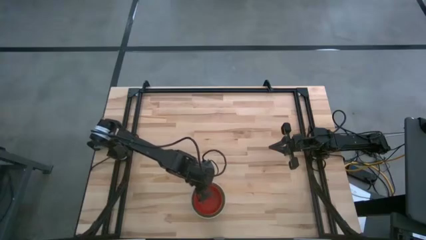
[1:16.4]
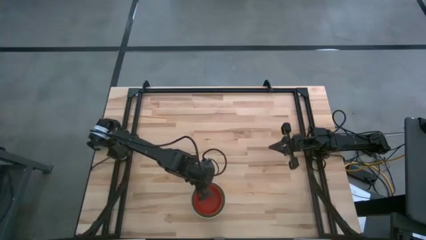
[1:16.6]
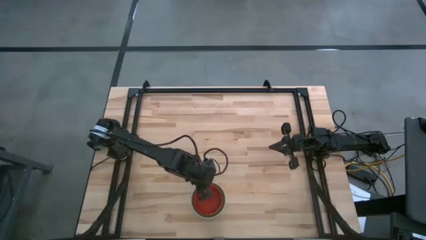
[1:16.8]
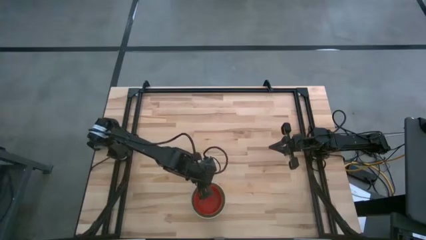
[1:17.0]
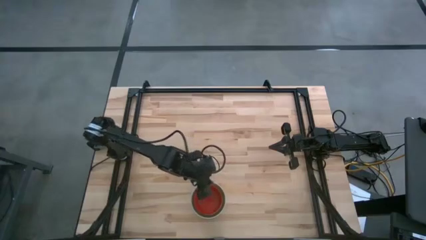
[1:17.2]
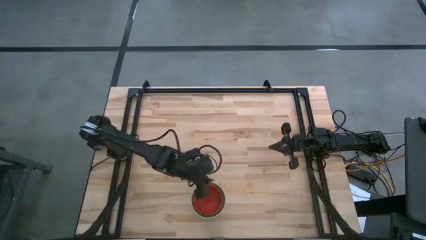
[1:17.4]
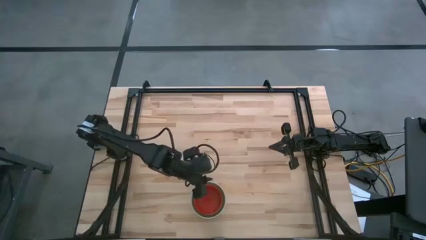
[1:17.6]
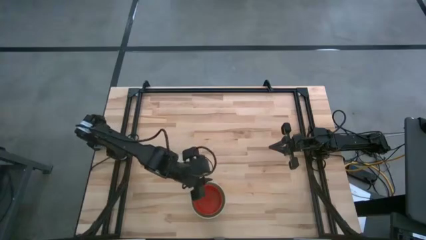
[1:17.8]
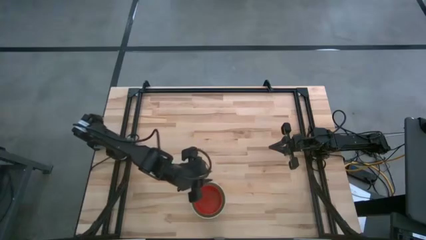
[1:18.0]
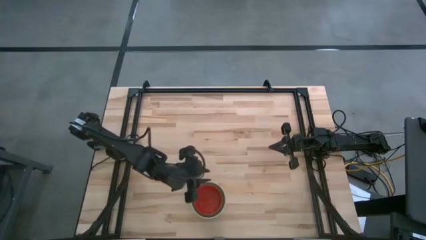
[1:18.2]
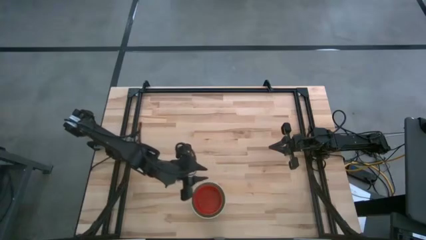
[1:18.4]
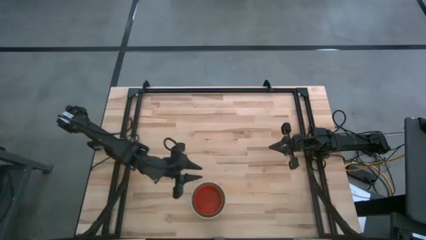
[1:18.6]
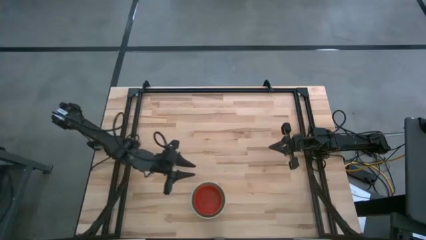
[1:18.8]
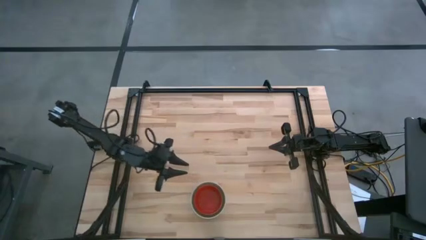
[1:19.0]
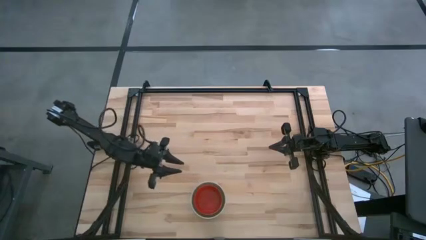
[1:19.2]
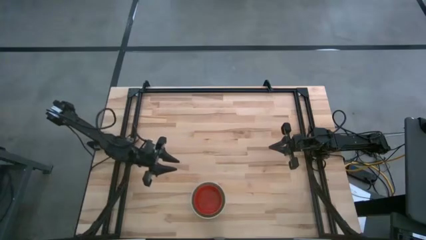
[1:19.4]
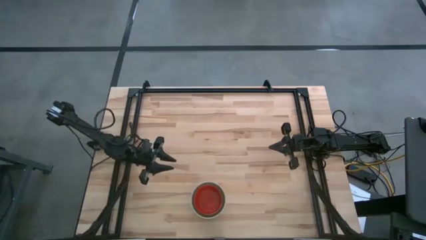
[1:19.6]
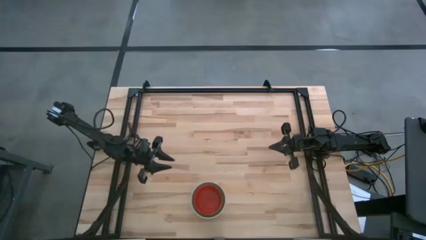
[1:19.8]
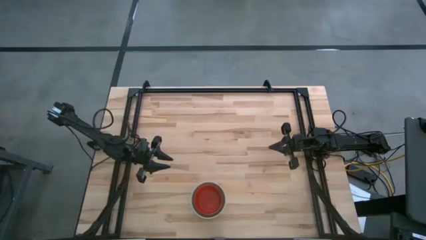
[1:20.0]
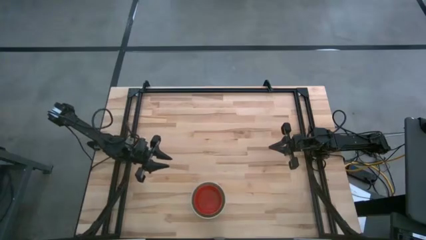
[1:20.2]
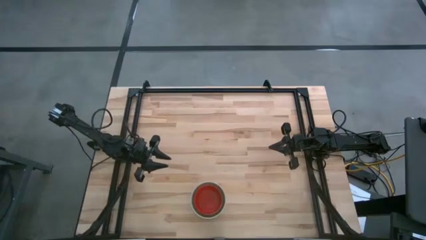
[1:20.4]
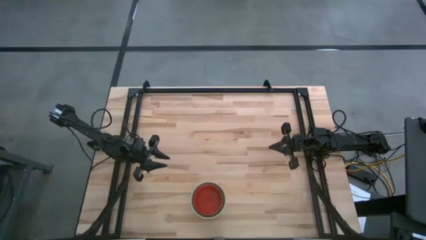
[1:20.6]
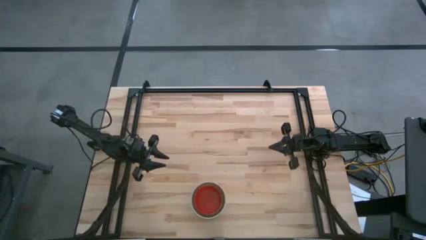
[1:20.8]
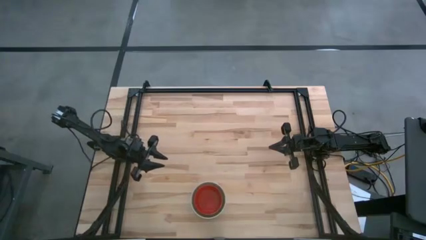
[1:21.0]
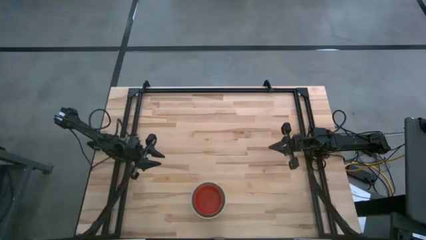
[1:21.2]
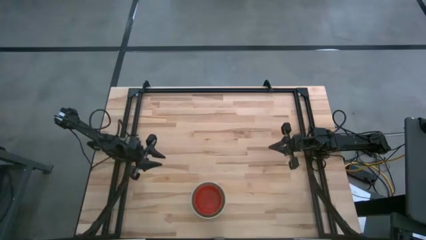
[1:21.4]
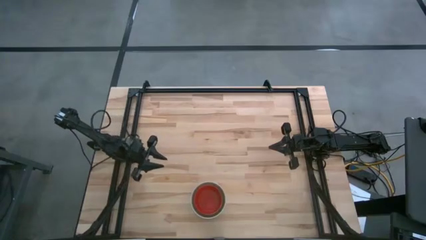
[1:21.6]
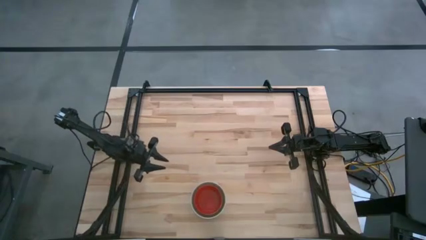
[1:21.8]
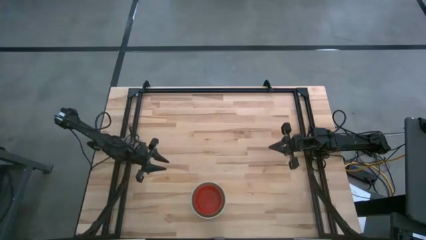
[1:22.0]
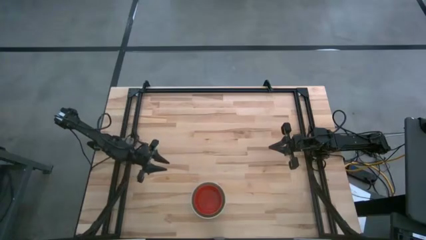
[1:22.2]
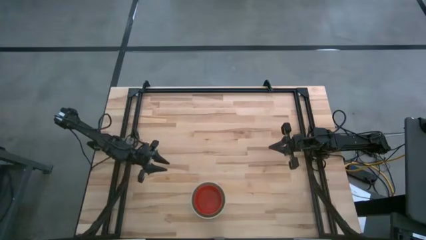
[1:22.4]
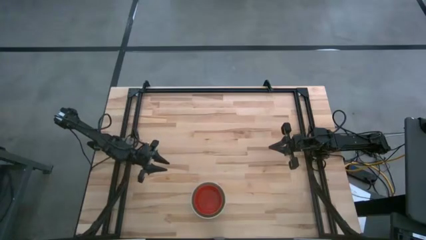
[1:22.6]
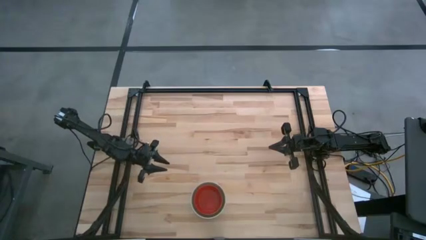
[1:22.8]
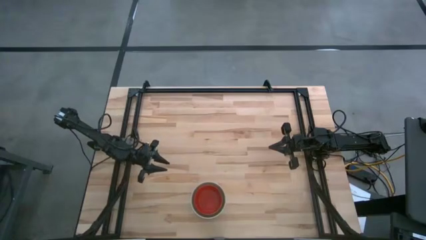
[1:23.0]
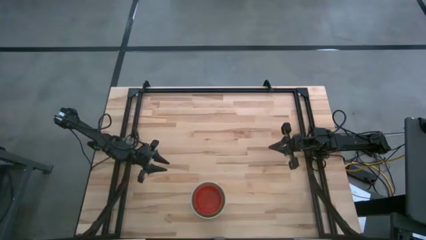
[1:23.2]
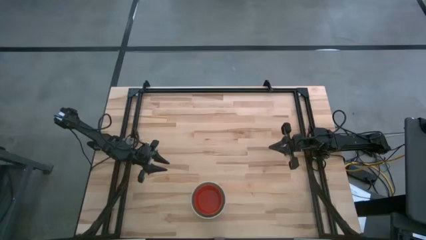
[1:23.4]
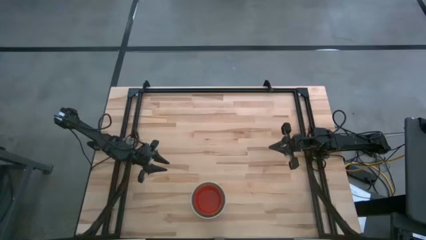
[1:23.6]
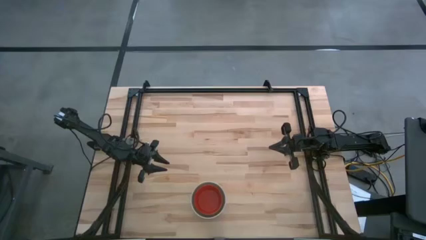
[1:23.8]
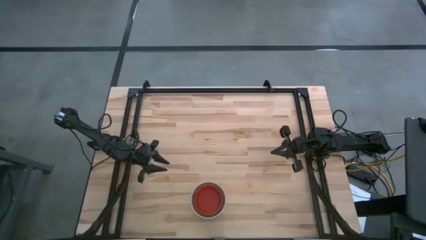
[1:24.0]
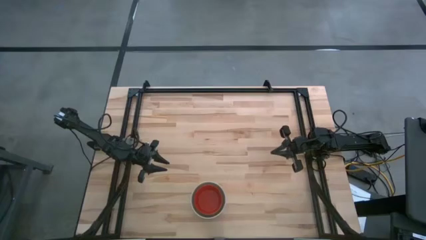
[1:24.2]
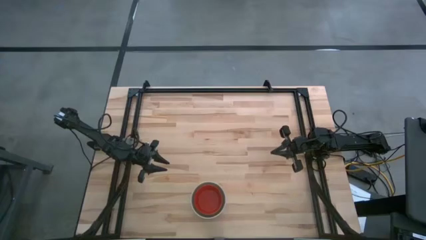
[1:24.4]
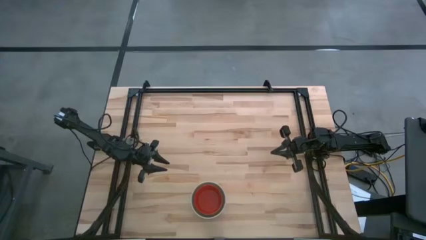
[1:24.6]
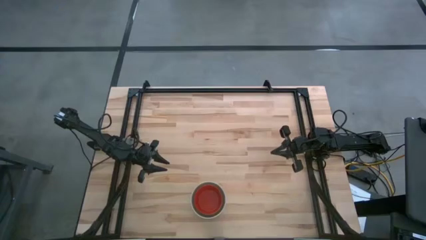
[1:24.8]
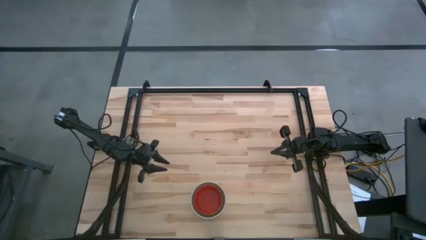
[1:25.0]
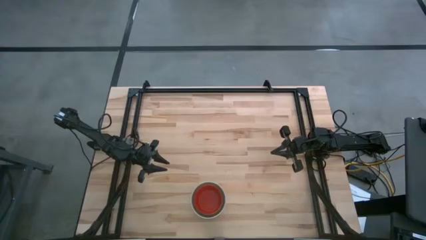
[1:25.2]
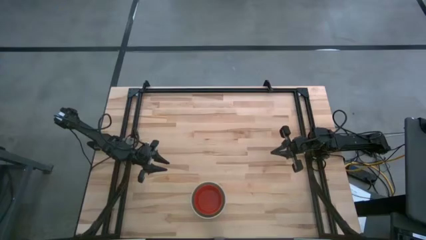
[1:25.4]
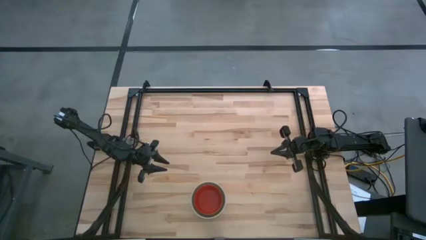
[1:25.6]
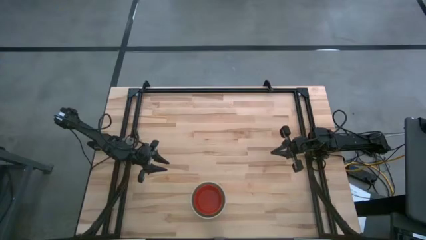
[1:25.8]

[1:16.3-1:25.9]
Return to Home Position
